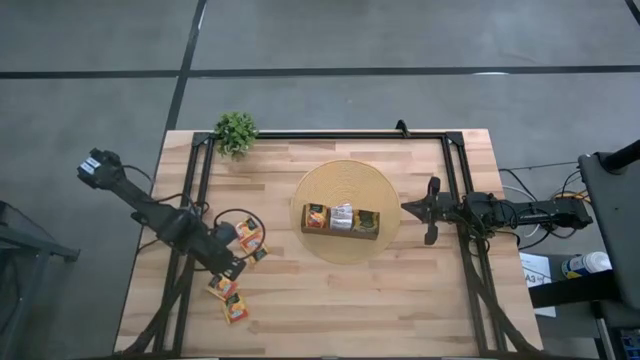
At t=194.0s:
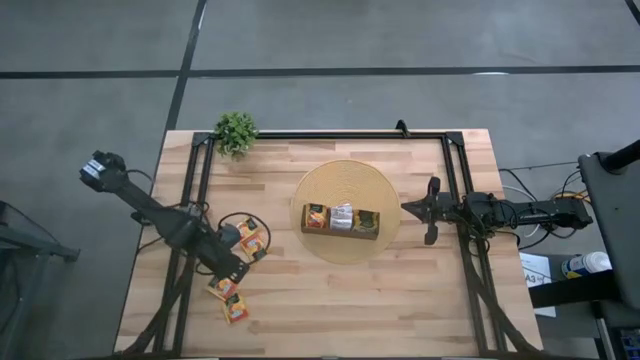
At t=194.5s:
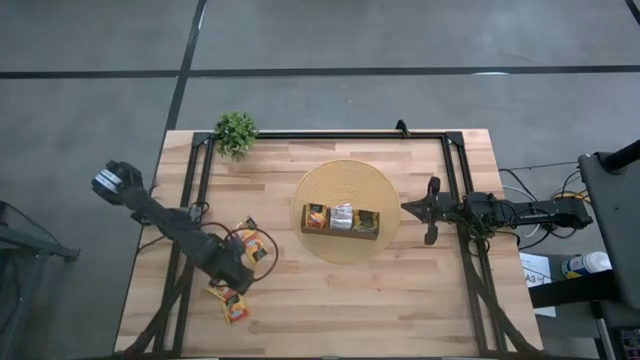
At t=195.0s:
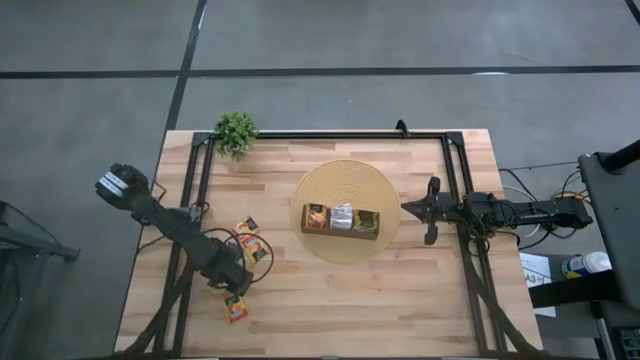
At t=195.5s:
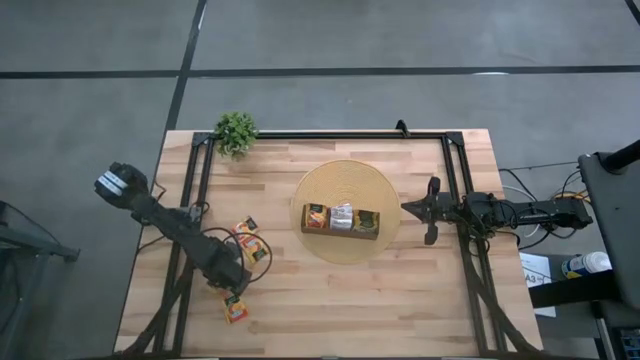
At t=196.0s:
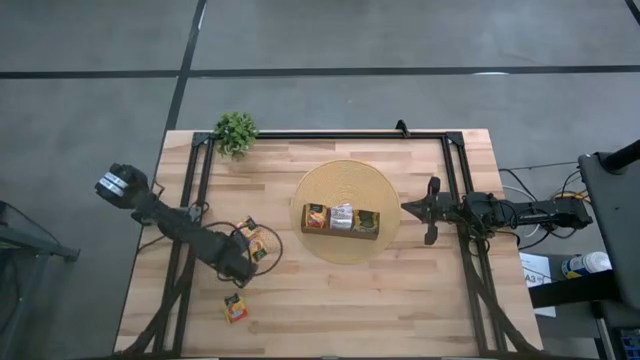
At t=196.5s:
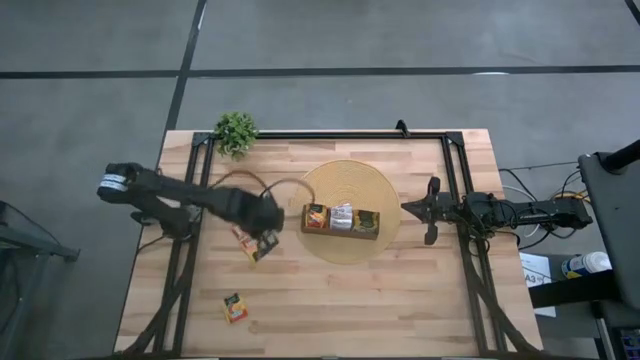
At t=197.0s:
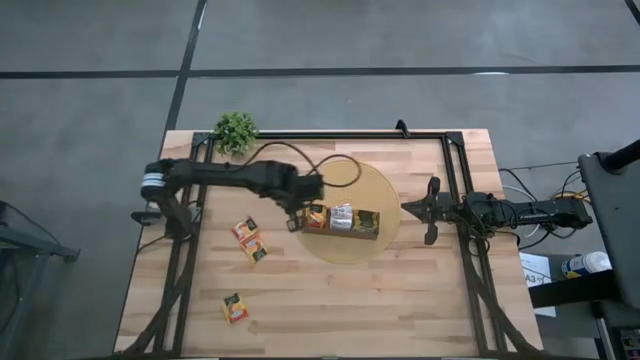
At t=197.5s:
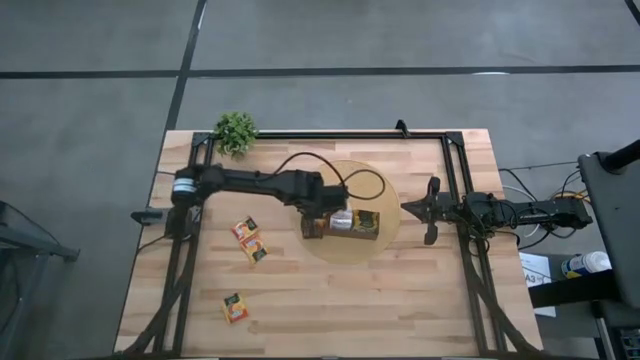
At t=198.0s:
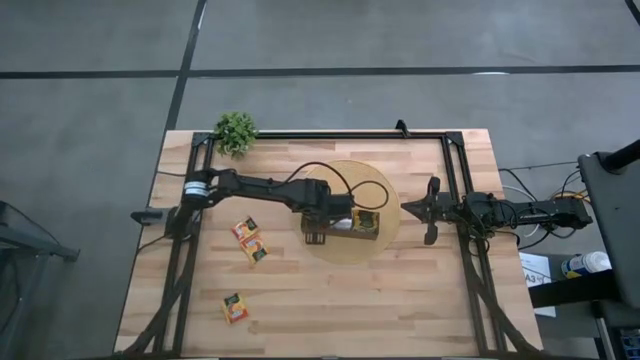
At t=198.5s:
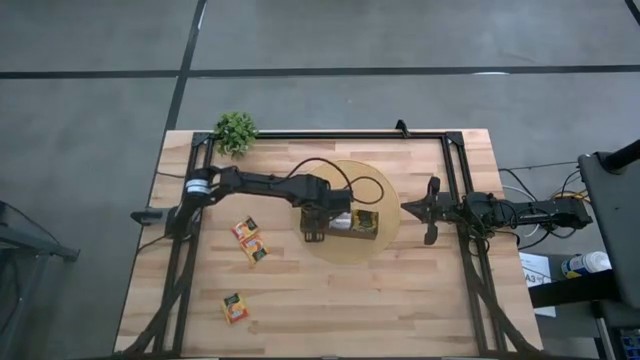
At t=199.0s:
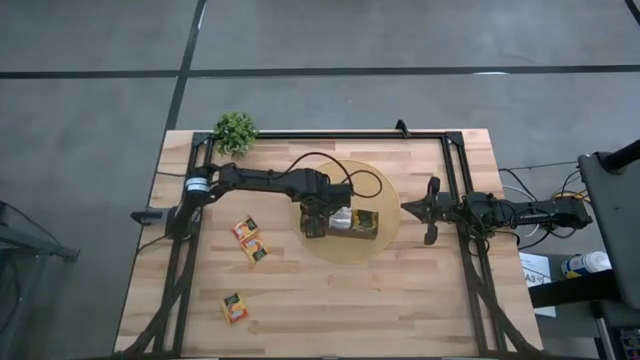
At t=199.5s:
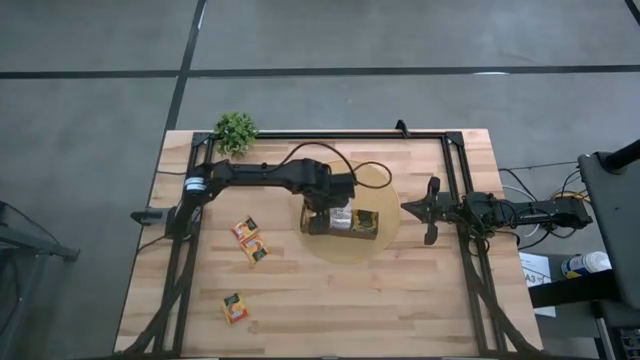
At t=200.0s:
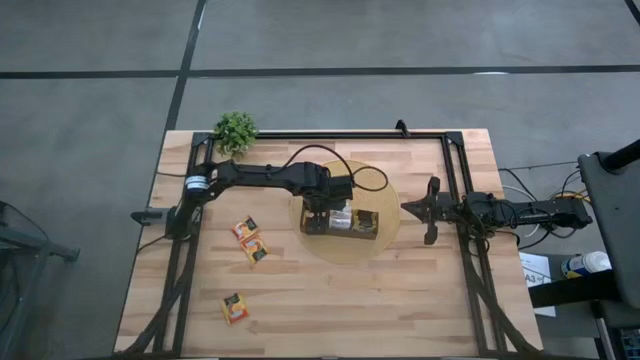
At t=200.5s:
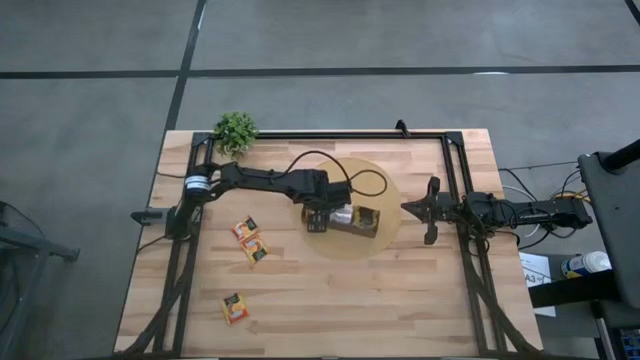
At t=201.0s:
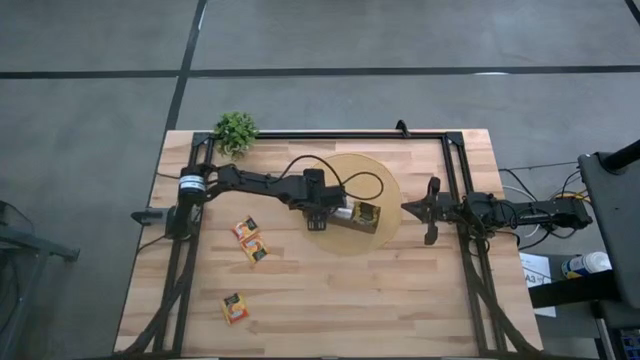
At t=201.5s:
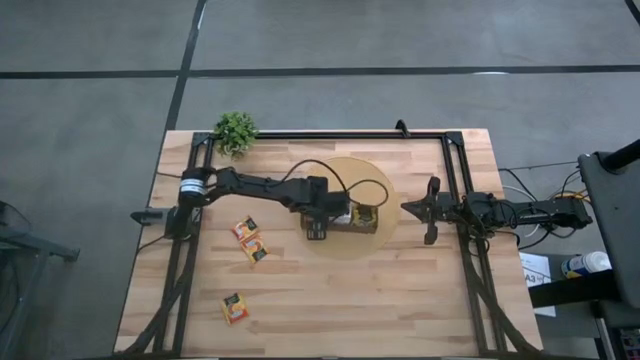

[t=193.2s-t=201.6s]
Task: Pick & Place Tea
Put the orange tea bag into the left section of the wooden organizer

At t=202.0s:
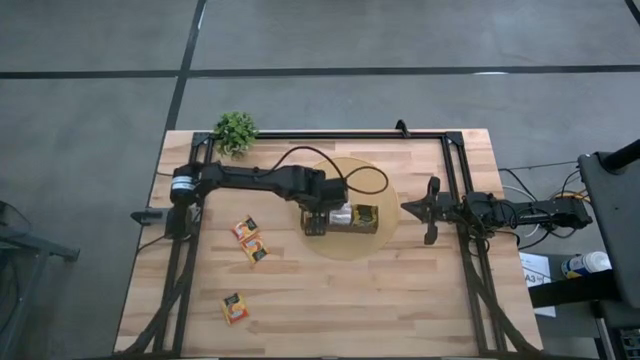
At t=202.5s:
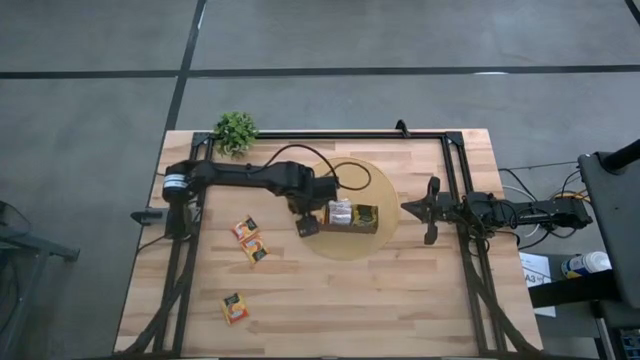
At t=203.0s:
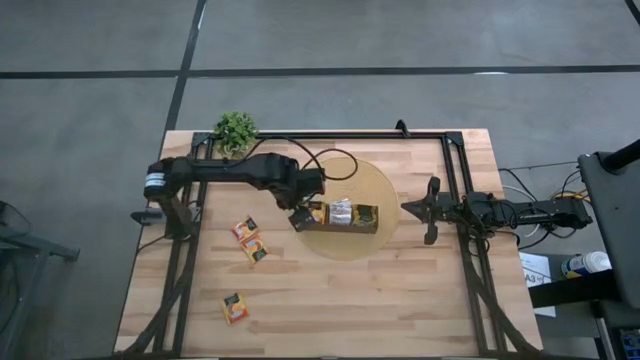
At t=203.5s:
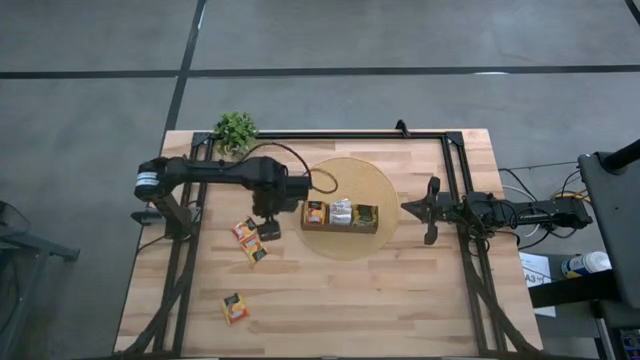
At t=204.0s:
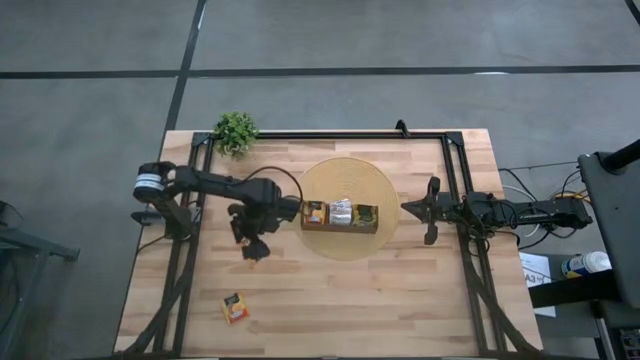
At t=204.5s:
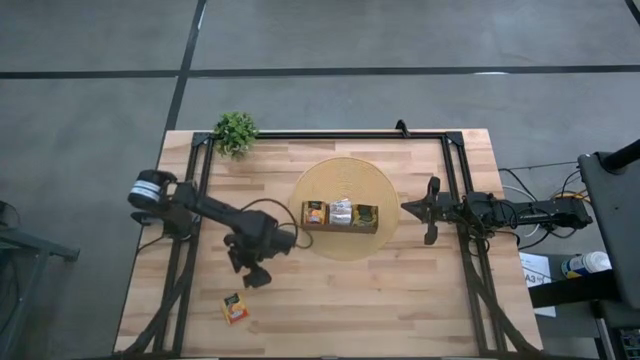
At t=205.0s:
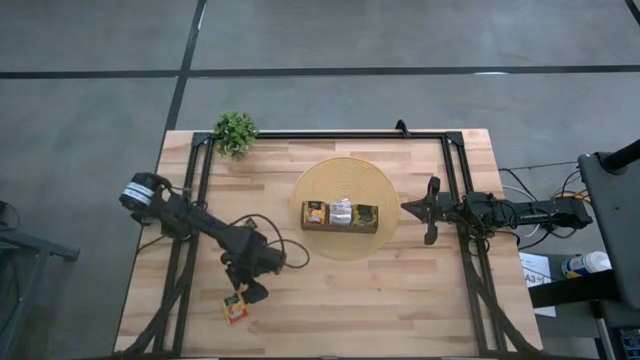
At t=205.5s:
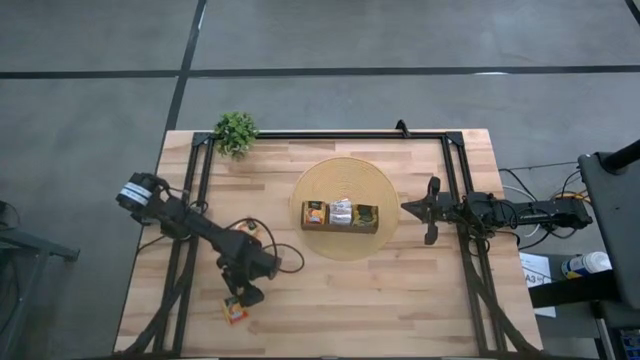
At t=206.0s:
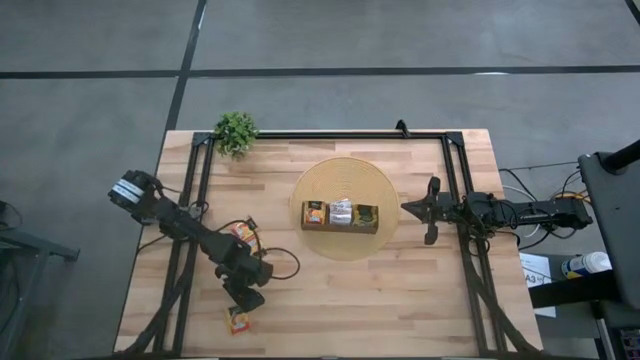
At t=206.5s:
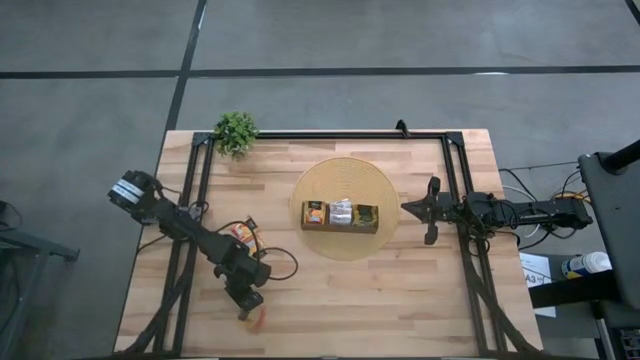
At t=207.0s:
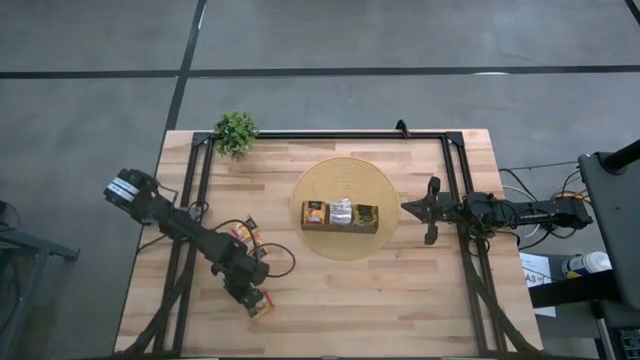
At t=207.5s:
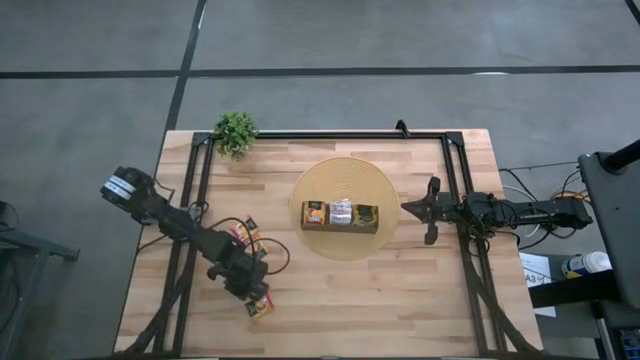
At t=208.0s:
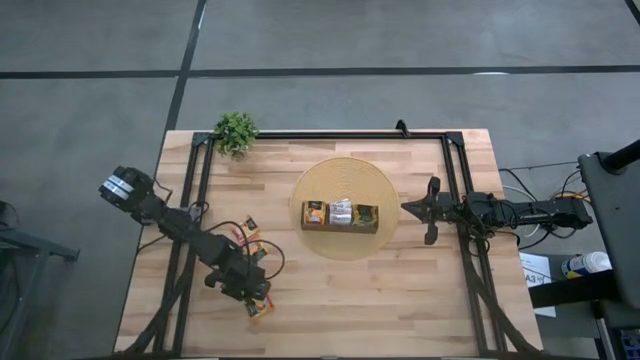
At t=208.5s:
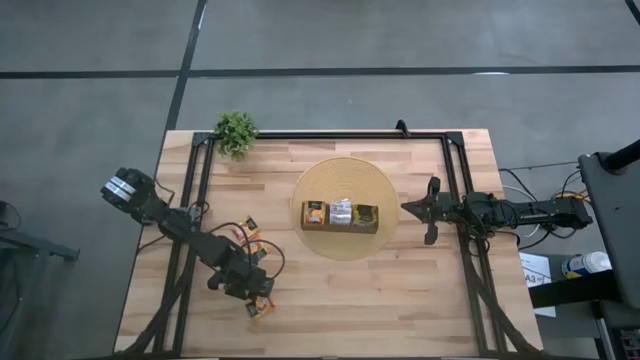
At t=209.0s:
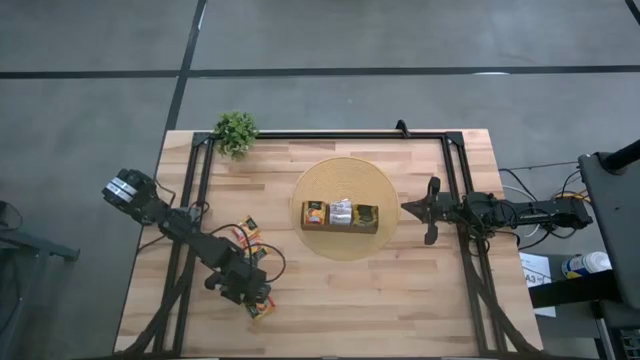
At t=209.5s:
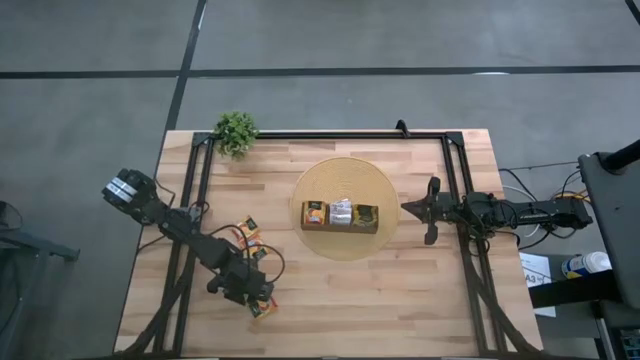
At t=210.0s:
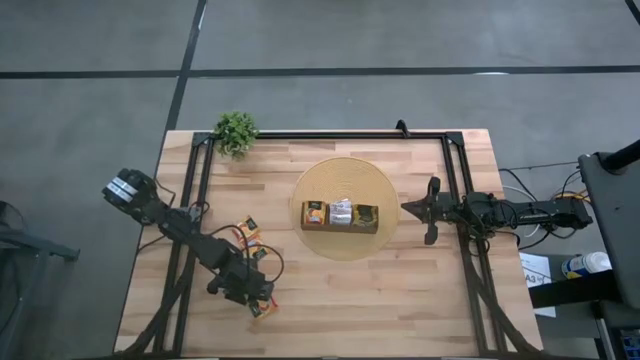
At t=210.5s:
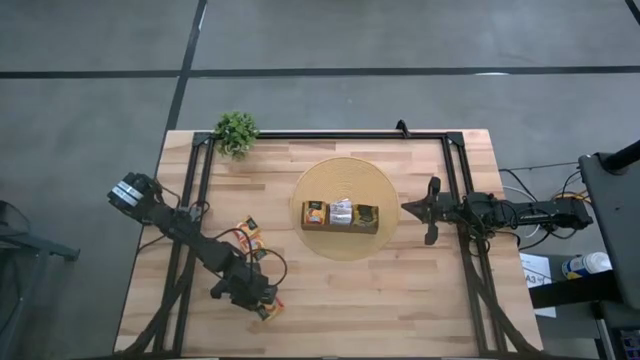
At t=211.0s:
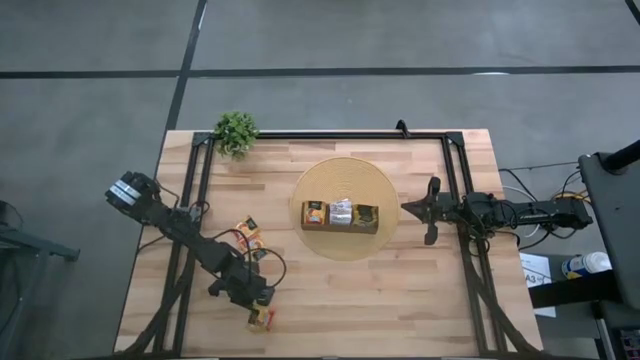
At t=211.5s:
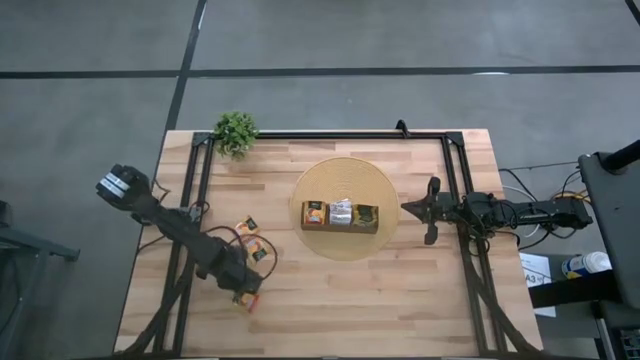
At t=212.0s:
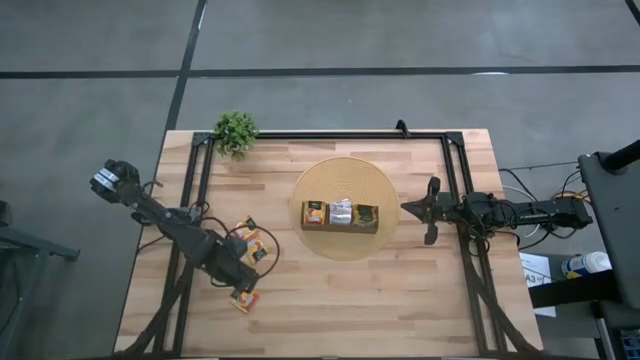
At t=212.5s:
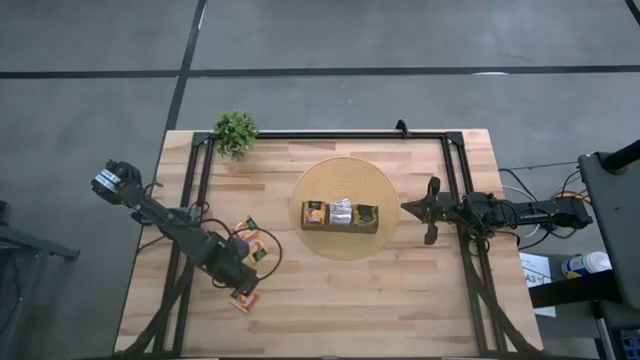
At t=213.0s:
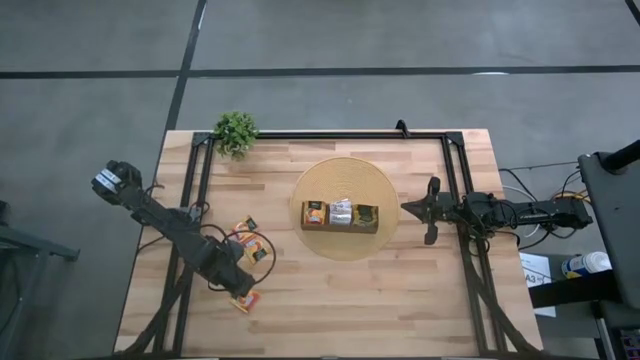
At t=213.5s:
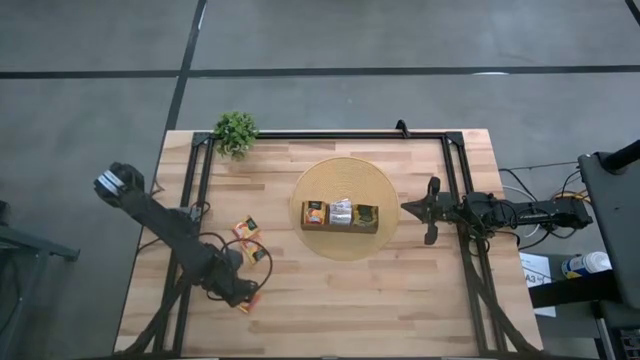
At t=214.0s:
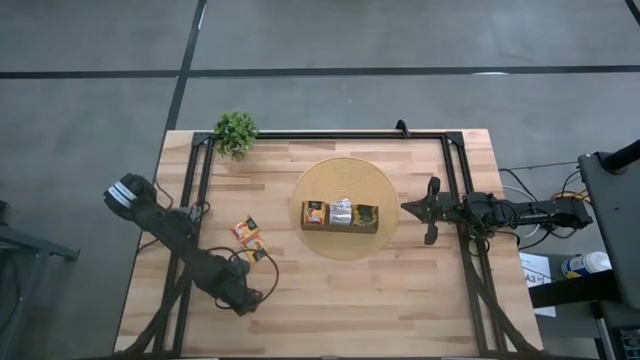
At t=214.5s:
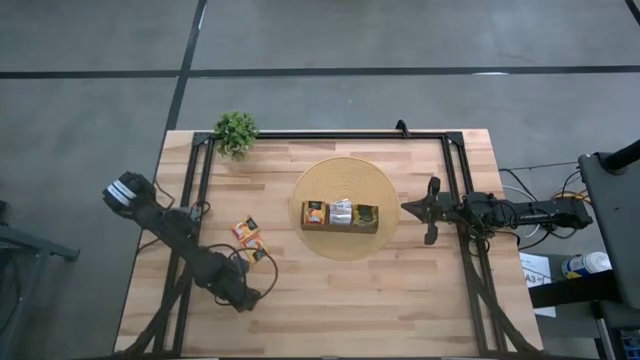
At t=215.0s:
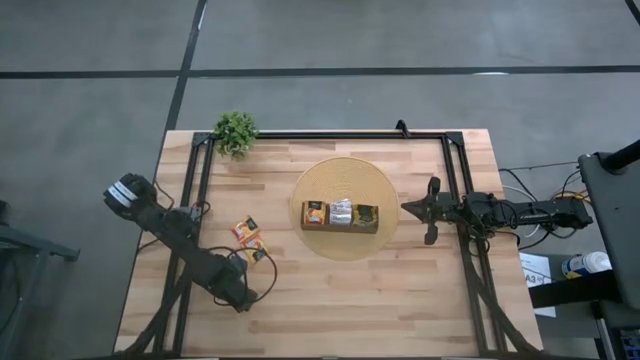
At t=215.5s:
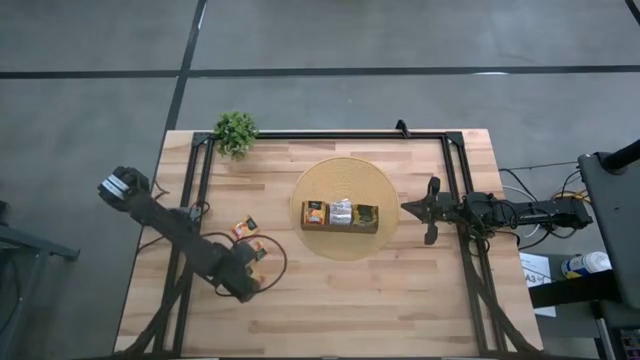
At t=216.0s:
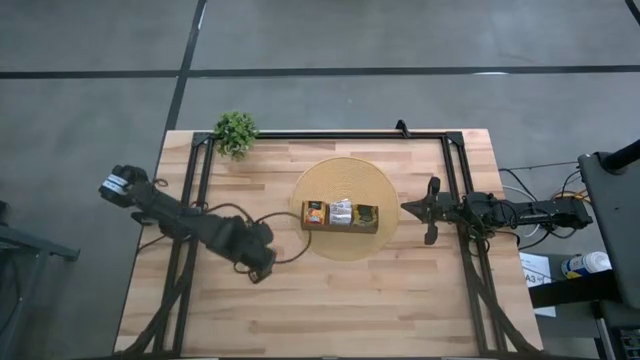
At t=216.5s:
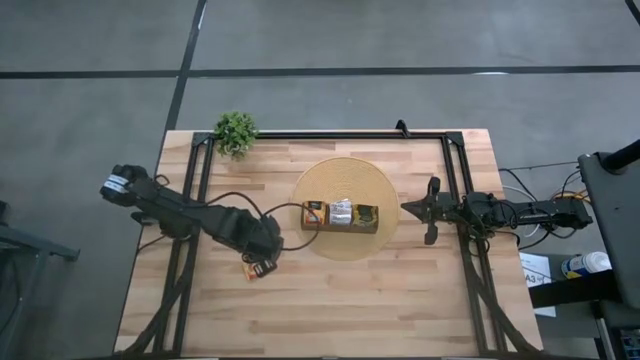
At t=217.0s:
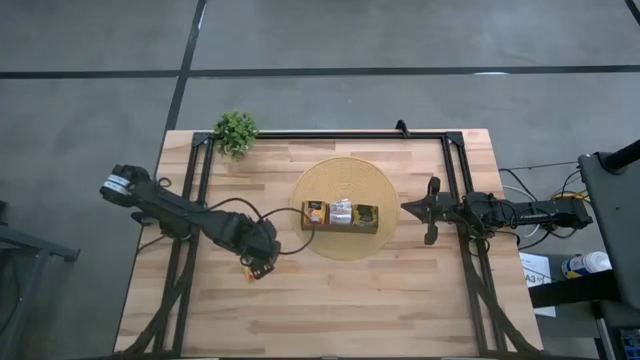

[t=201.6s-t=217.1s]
Put the orange tea bag into the left section of the wooden organizer
